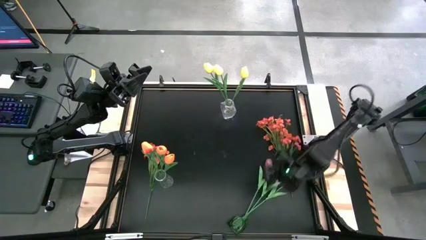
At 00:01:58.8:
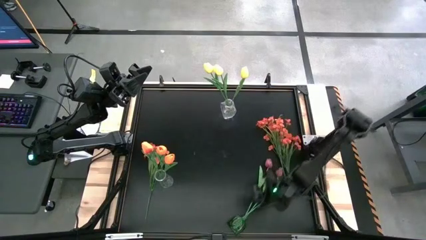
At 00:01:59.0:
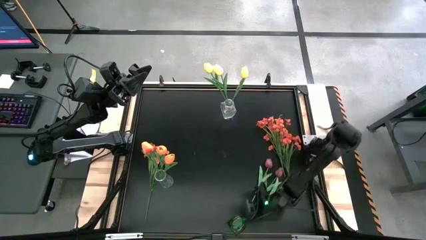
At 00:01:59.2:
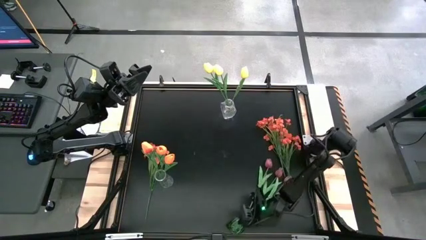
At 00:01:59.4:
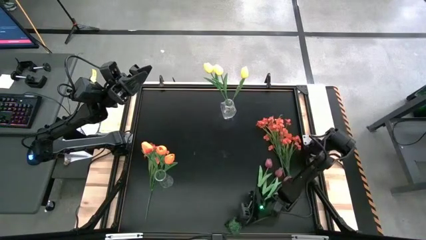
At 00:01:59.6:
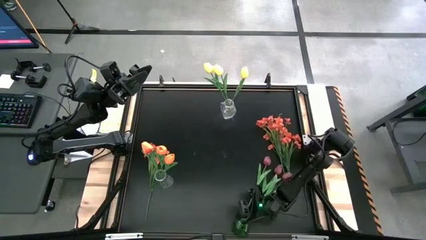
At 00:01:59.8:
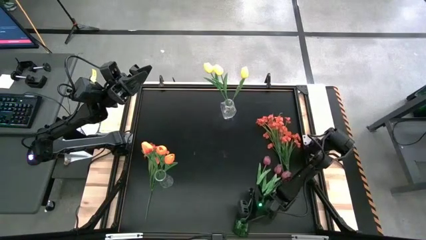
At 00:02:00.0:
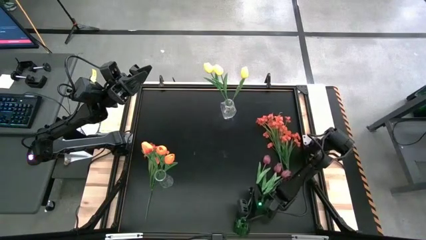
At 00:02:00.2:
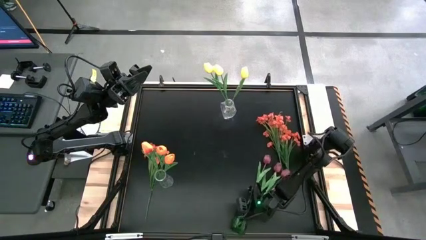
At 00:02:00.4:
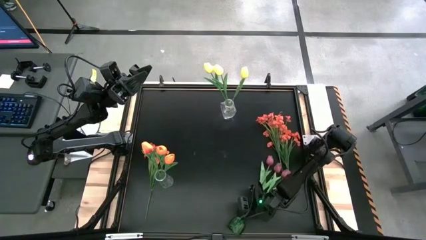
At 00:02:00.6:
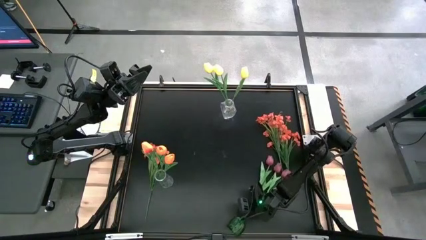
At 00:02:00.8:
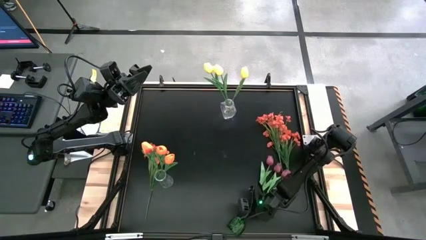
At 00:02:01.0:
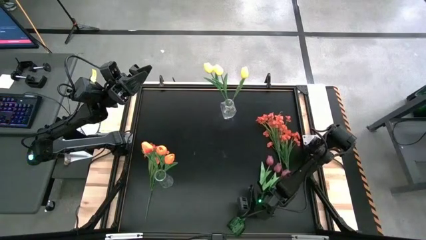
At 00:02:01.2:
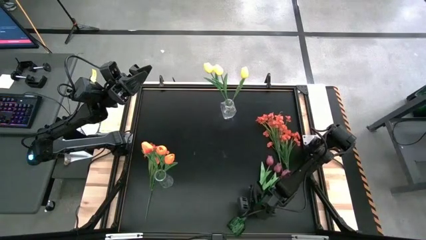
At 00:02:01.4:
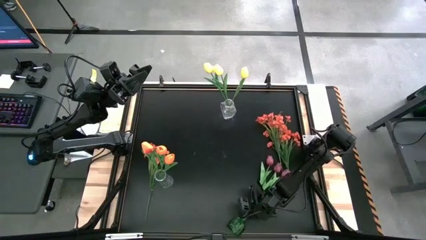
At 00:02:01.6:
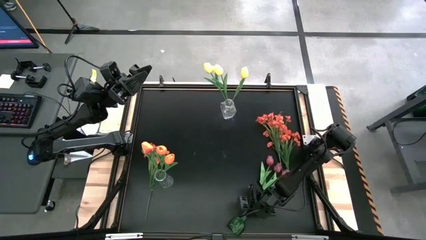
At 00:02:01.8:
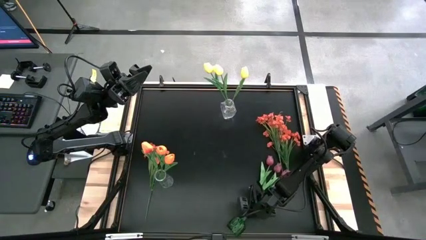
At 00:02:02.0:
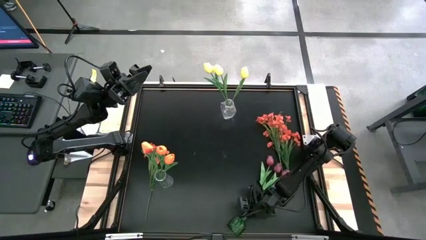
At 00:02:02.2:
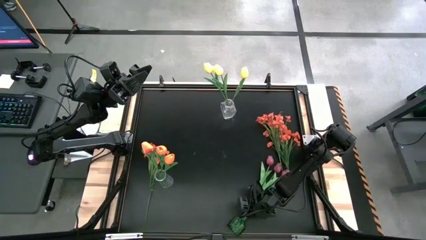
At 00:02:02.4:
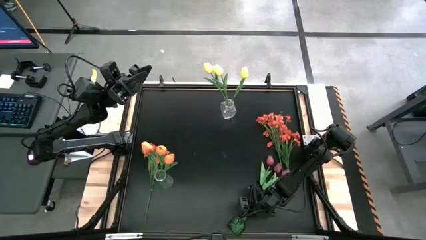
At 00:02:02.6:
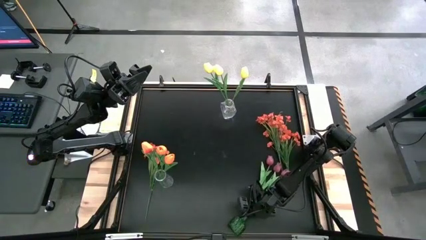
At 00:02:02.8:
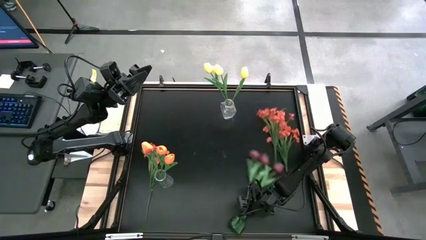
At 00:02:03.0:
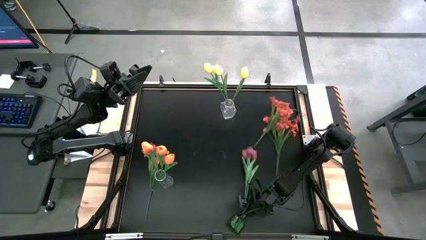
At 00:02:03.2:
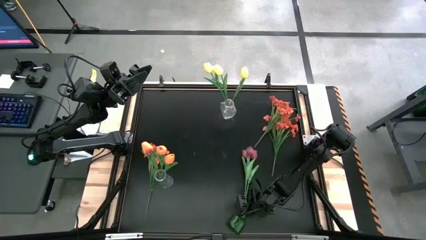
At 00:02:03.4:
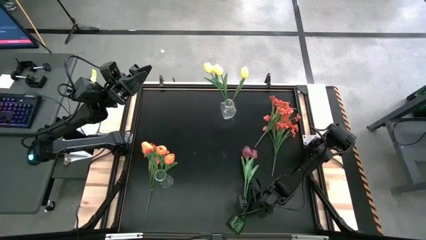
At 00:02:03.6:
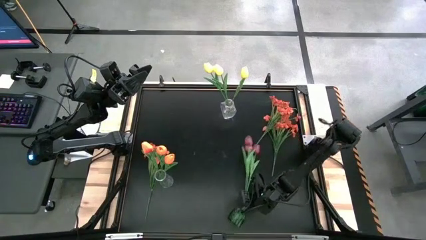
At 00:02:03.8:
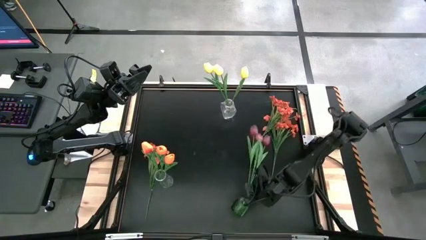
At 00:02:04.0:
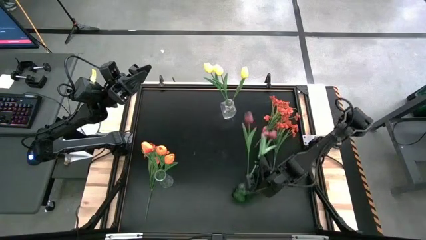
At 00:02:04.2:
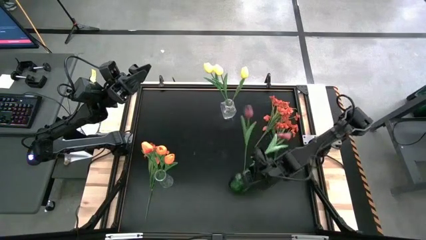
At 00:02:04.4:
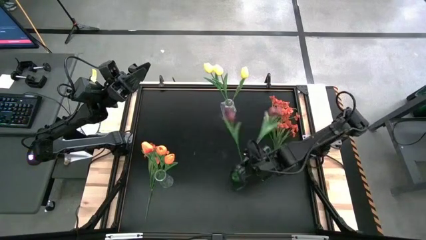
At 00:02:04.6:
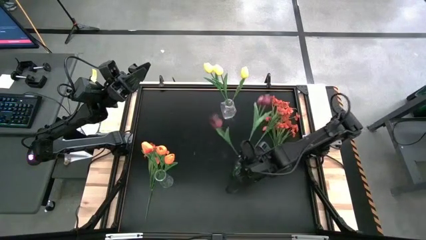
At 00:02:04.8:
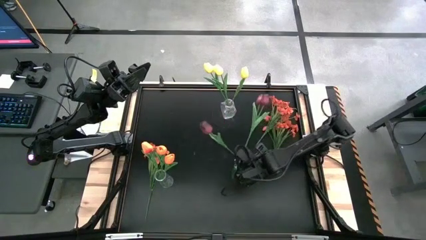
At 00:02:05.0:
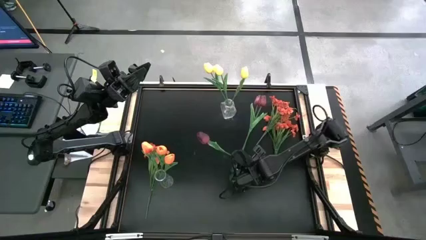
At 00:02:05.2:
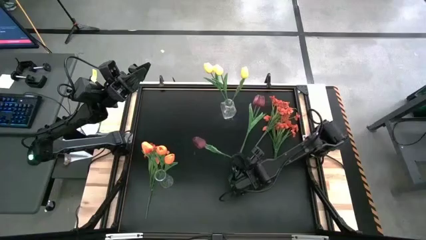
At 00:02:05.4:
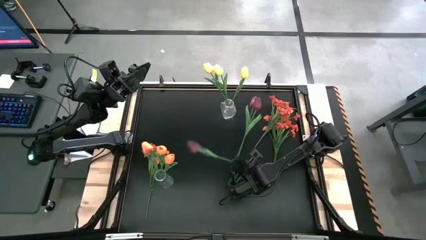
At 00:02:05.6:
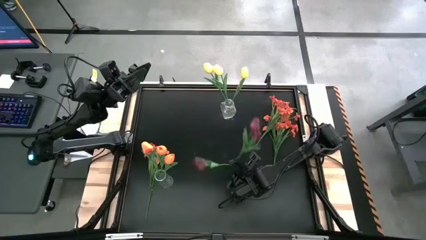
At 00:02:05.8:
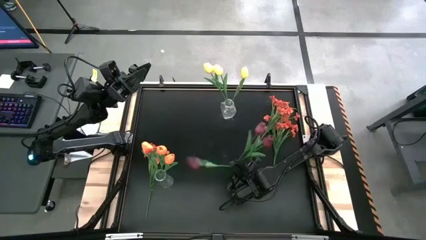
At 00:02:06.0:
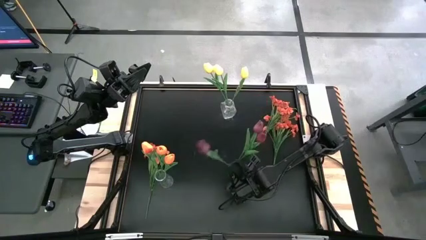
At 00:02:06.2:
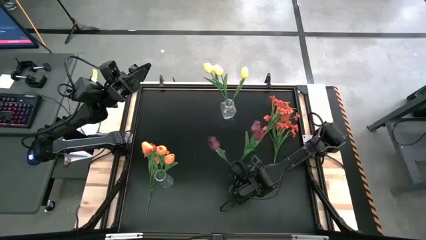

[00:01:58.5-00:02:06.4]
Task: Sort flowers into vase by color
Adjust the green vases

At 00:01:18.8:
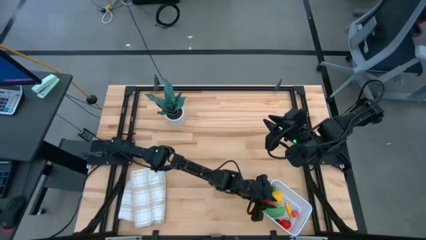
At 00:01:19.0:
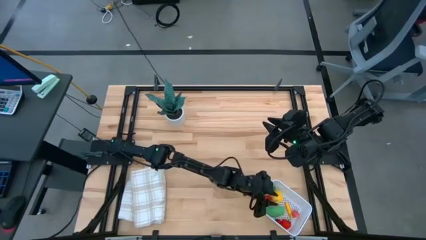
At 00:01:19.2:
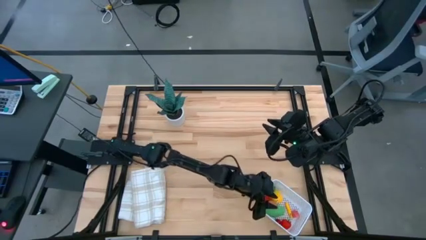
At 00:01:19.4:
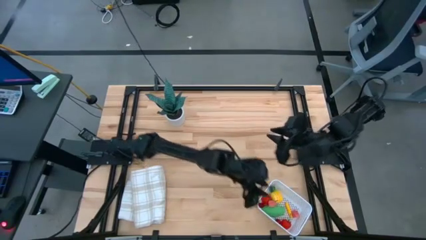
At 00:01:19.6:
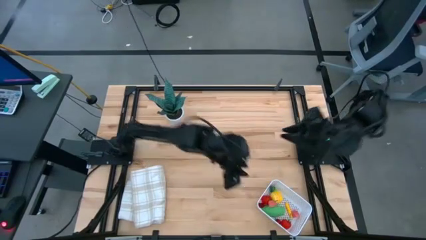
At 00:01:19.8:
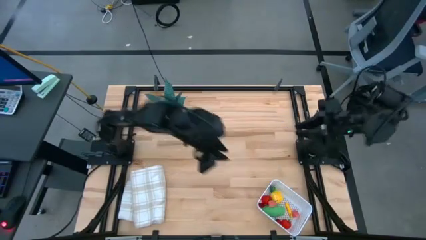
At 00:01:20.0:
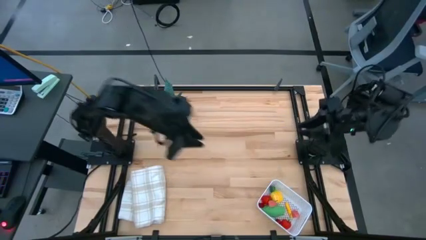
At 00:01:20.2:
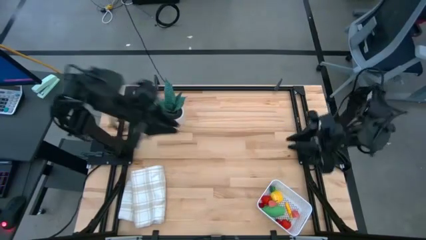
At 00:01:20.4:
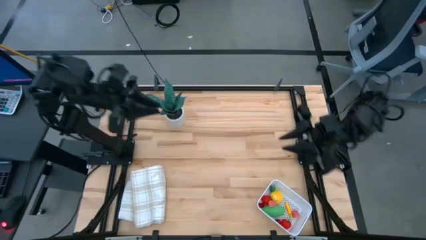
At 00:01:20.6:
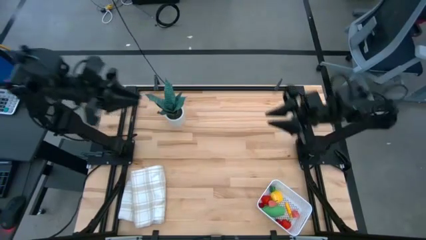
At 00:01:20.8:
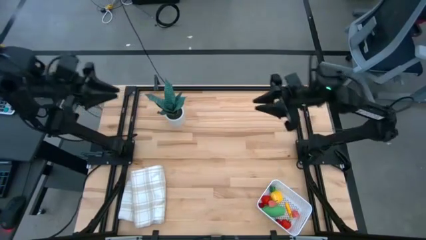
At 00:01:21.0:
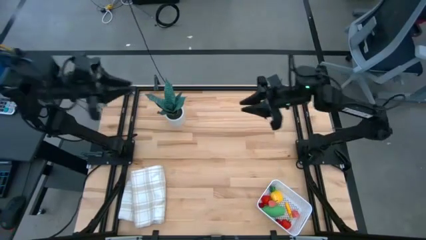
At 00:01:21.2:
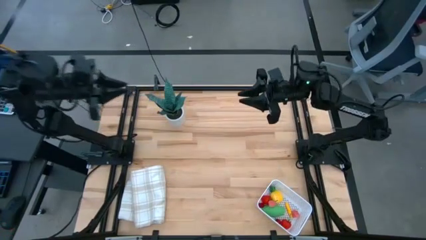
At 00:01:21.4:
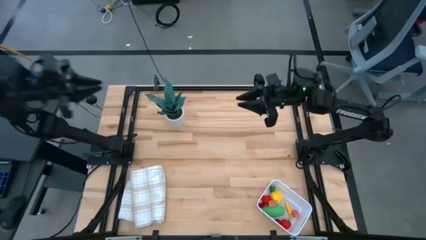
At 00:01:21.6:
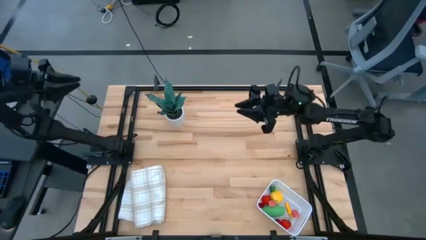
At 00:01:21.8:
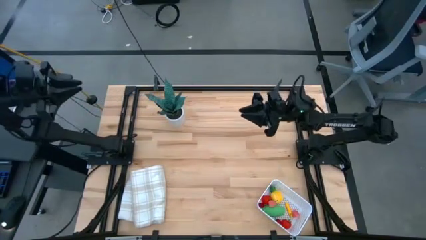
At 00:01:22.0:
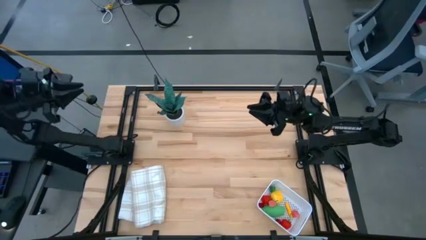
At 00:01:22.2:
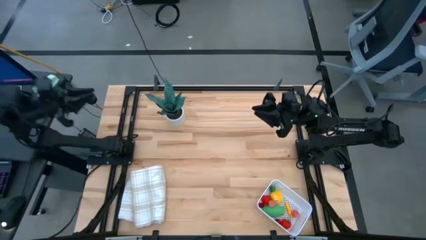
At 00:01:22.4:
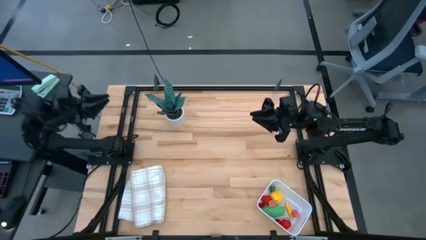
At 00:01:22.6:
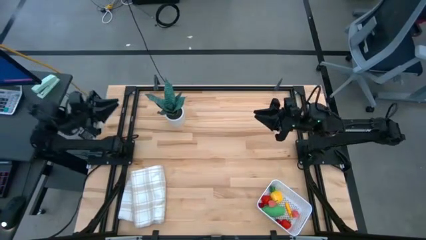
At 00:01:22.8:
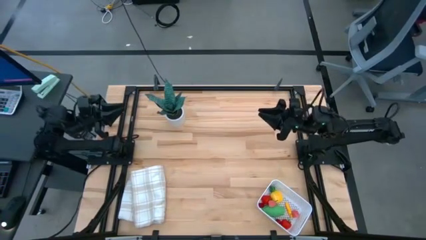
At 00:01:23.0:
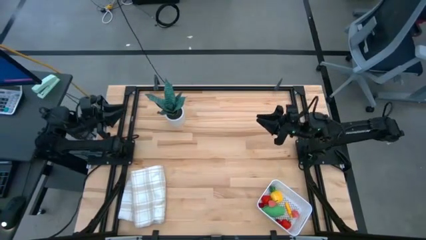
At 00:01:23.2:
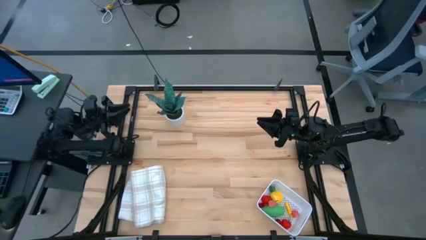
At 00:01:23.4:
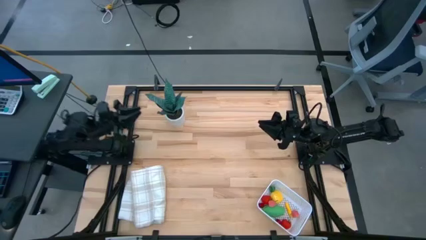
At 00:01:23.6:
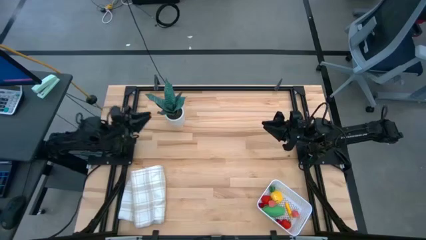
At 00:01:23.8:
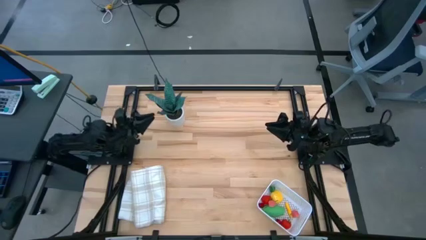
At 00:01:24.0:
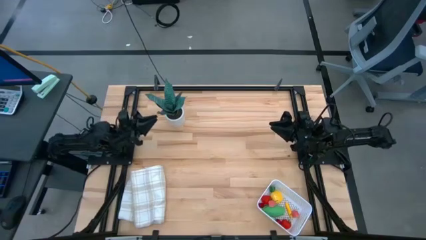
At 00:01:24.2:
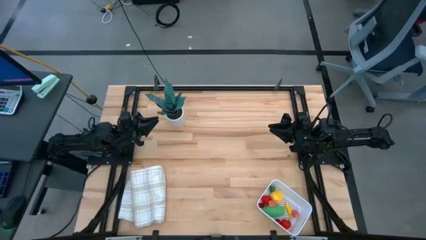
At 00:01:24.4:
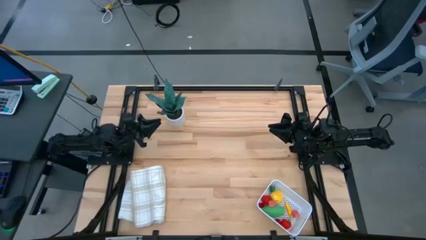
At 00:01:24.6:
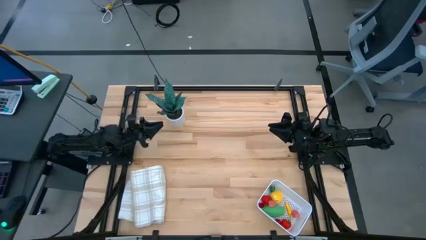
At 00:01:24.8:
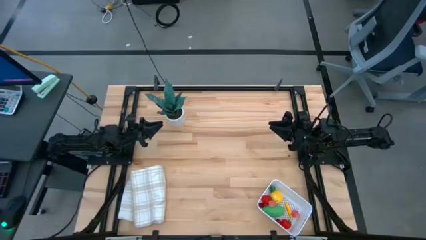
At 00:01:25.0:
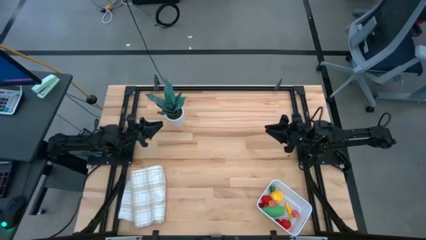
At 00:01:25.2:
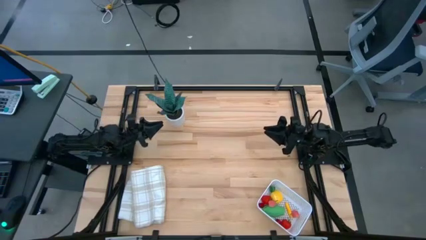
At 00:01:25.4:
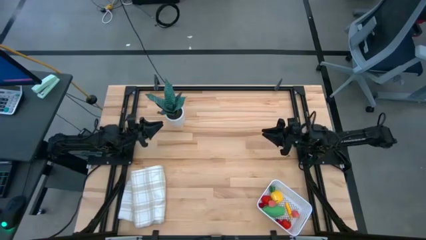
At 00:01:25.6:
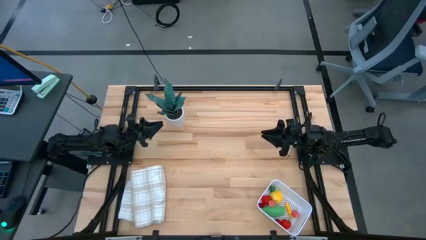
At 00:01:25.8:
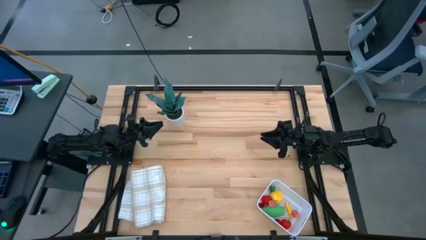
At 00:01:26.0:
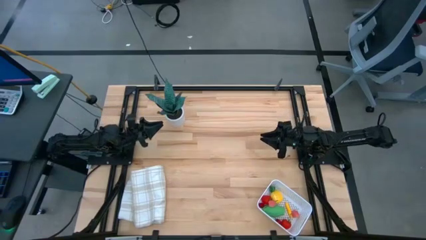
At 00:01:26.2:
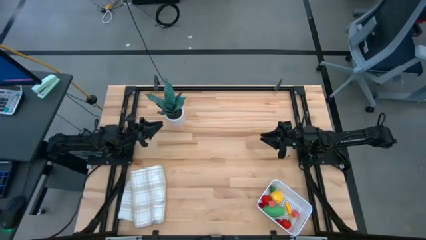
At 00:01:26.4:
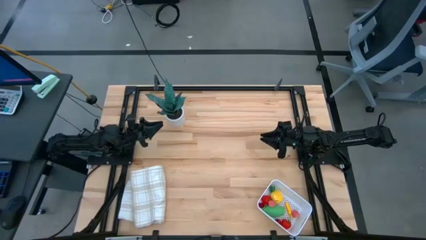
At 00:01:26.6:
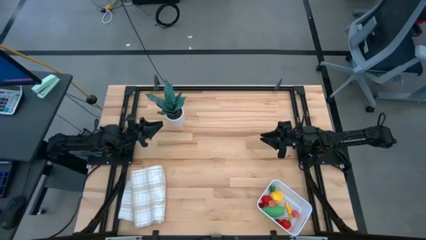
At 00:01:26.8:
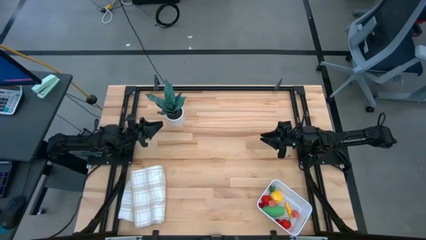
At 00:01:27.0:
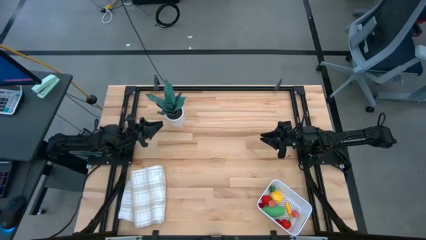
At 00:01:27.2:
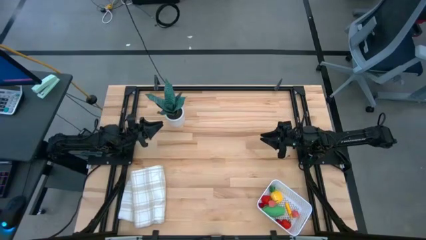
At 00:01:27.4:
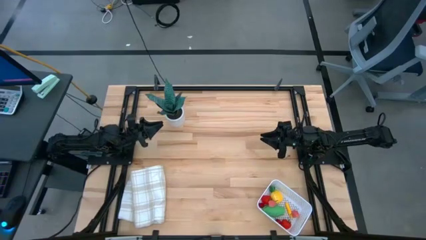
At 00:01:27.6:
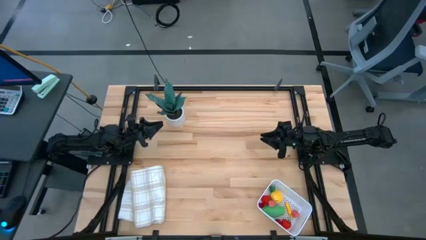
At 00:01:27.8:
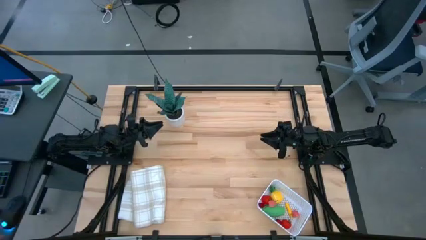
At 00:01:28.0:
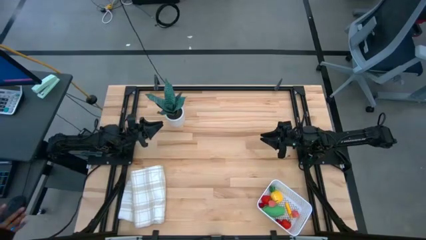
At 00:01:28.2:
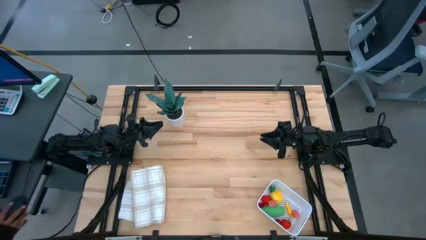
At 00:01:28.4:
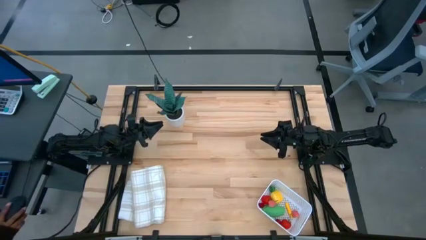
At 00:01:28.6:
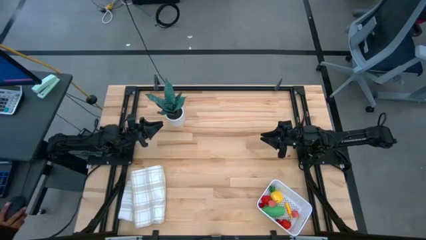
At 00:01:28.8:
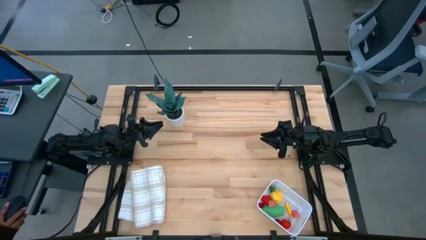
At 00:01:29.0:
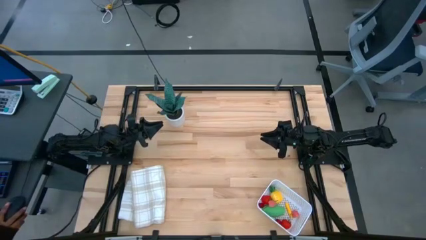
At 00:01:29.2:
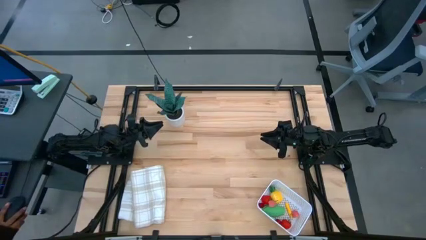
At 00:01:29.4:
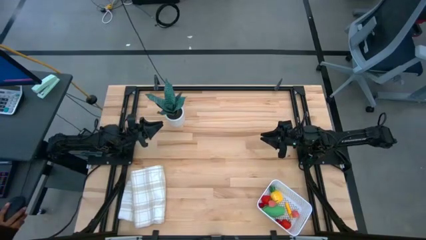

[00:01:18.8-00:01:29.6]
Task: Pick and placing Produce into tupperware
Return to Home Position
